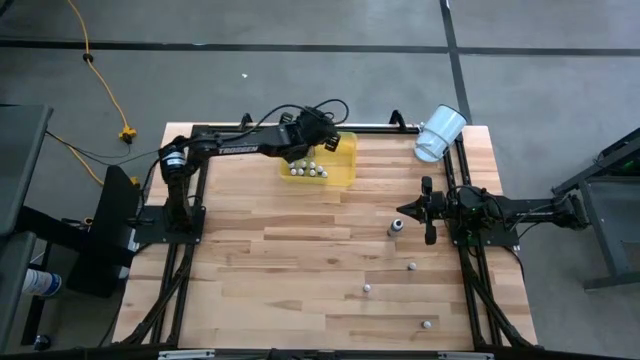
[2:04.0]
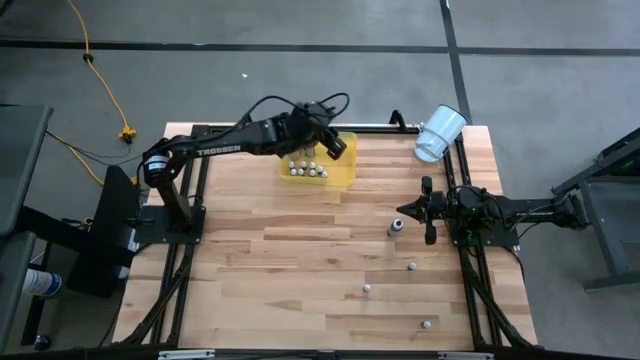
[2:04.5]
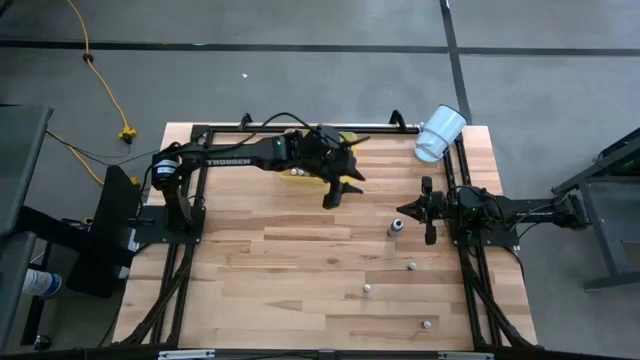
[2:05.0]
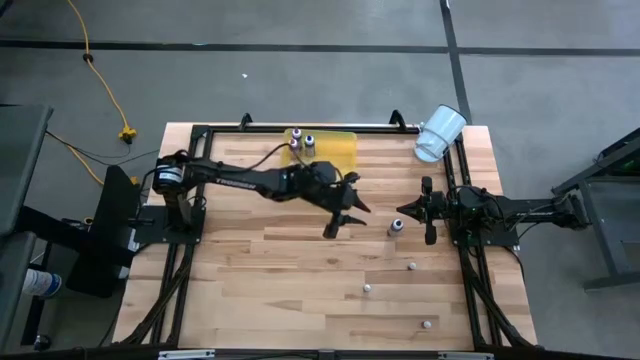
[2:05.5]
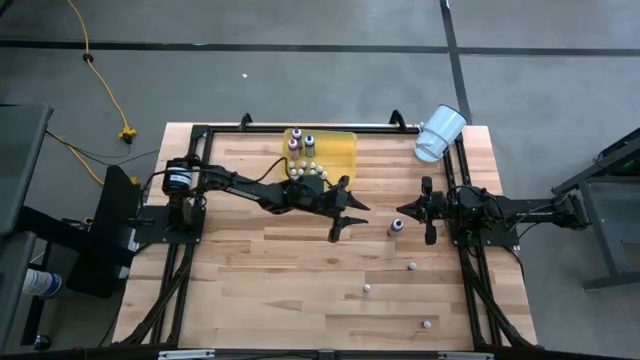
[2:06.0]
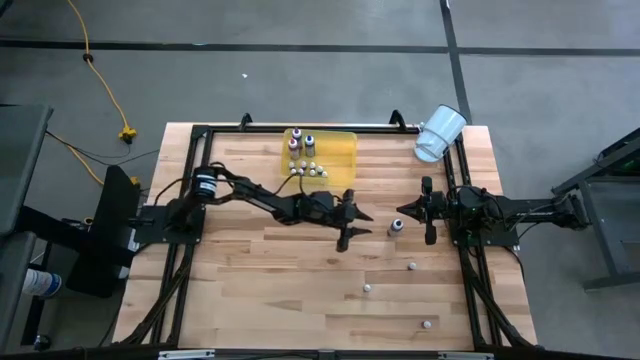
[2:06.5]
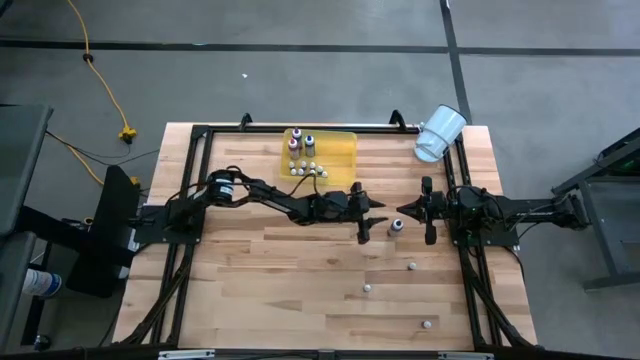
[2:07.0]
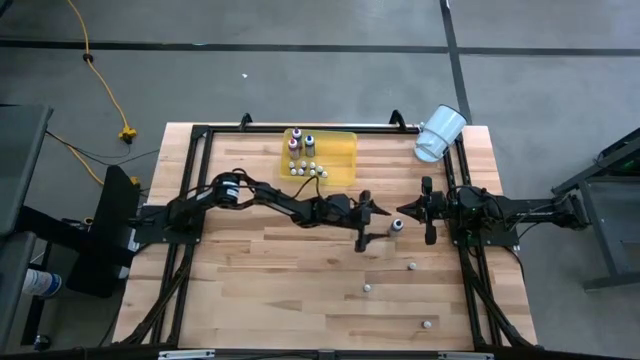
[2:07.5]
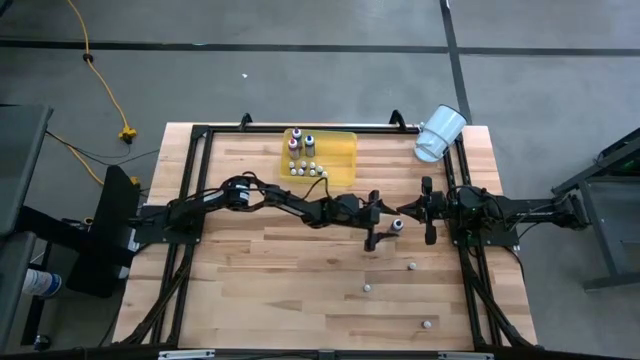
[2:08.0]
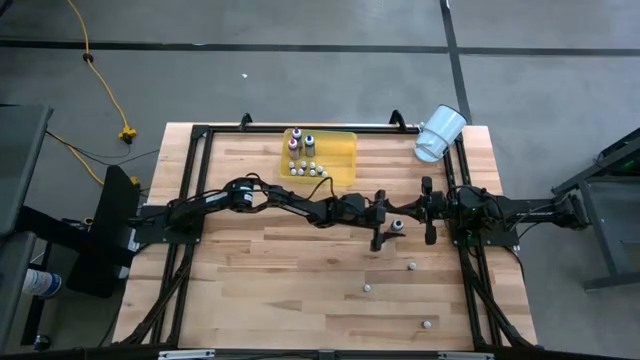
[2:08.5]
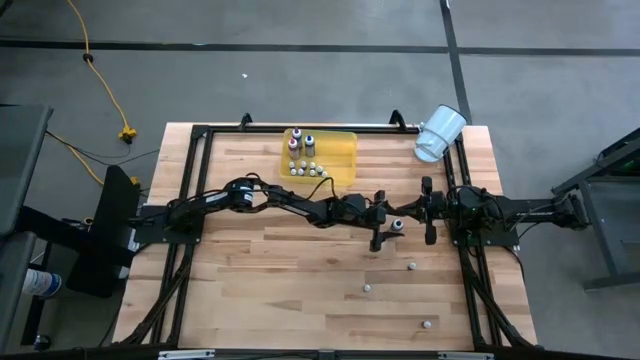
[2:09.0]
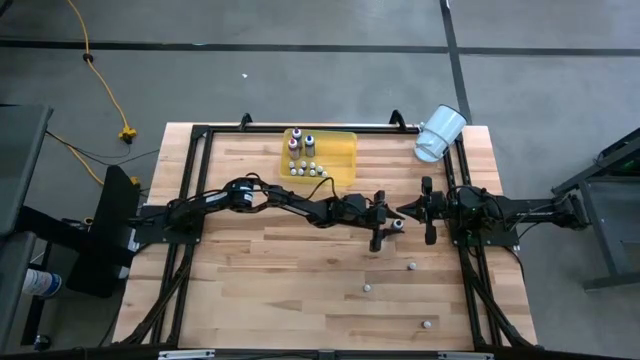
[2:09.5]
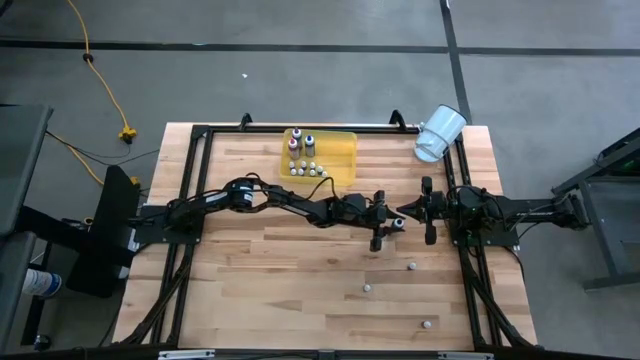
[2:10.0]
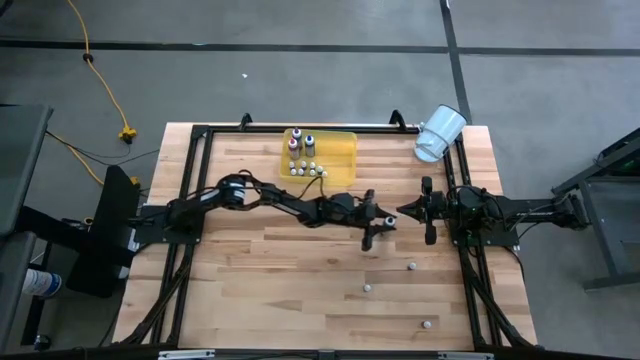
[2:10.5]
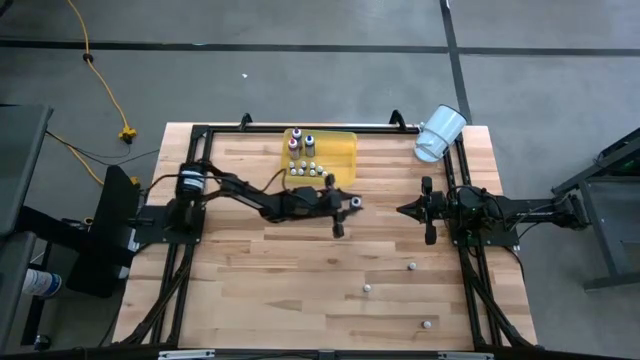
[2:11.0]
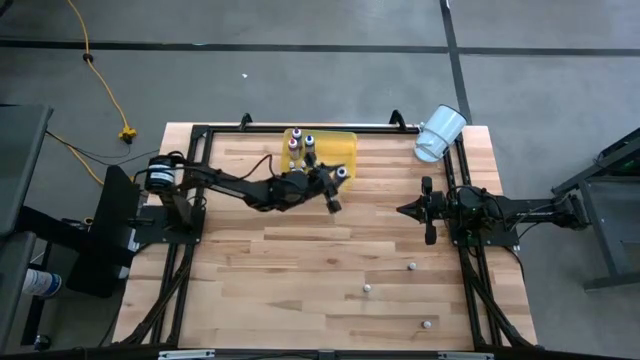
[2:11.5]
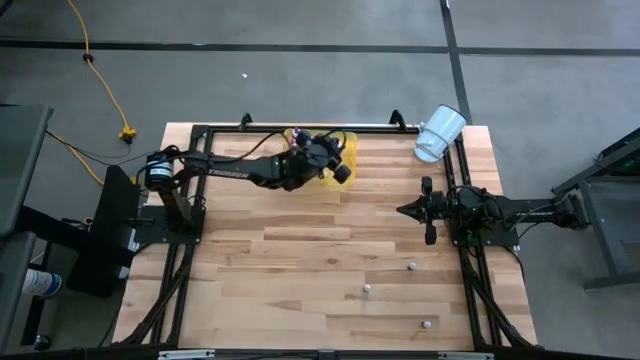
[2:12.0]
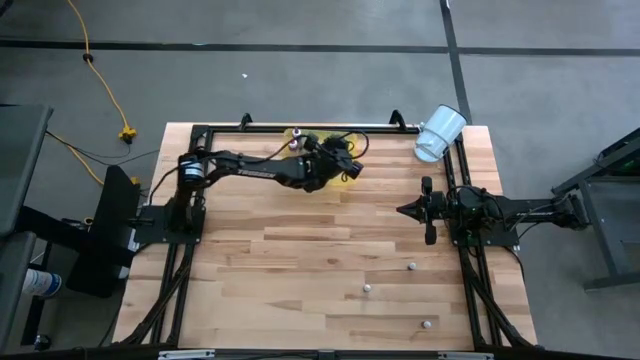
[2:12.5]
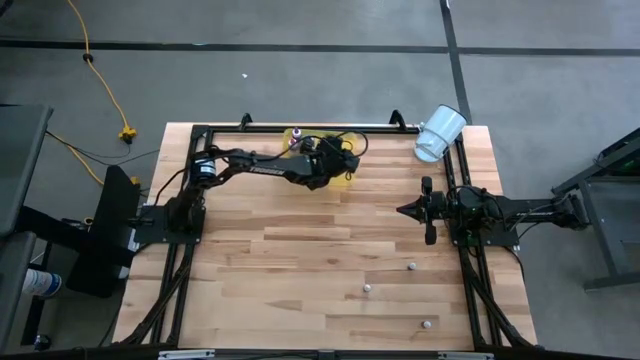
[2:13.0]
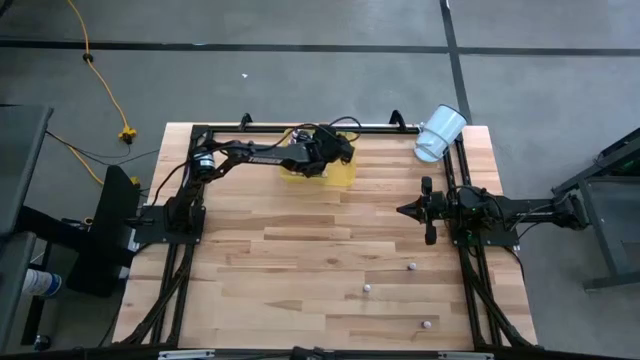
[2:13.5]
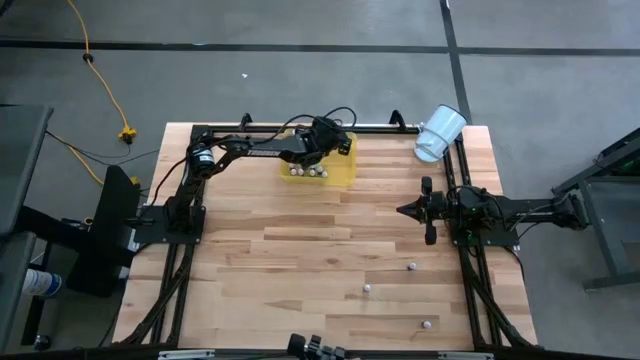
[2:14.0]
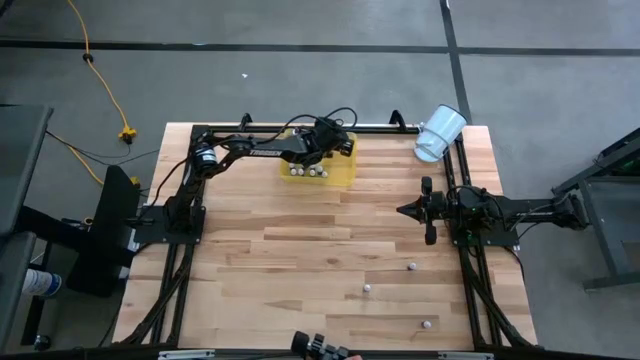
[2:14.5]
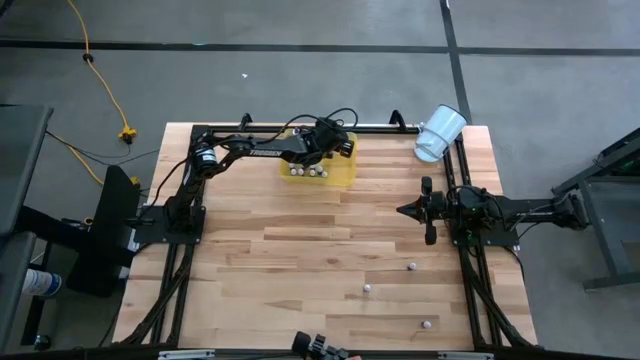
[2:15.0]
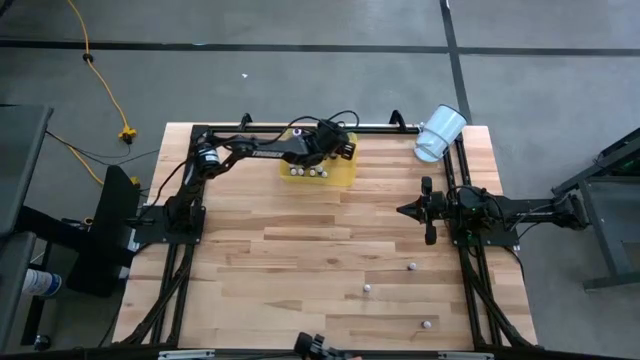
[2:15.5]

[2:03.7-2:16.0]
Task: Pick & Place food coloring
Put the large black food coloring into the yellow container

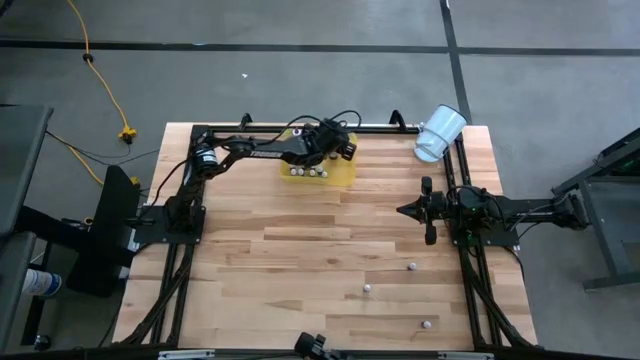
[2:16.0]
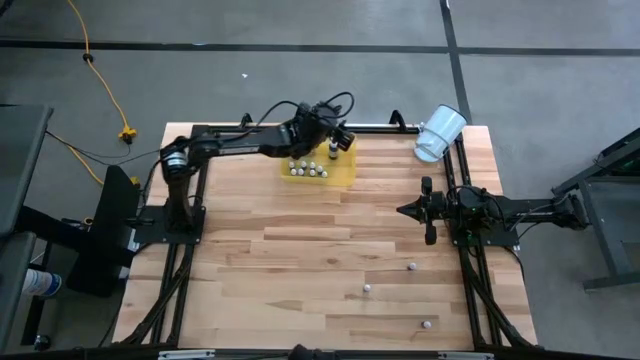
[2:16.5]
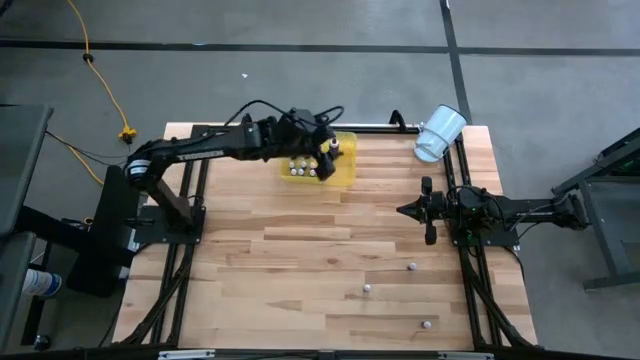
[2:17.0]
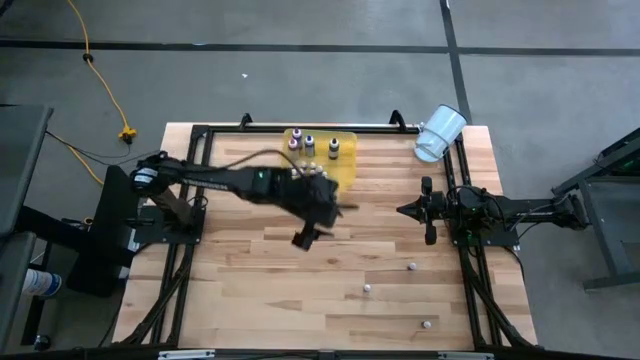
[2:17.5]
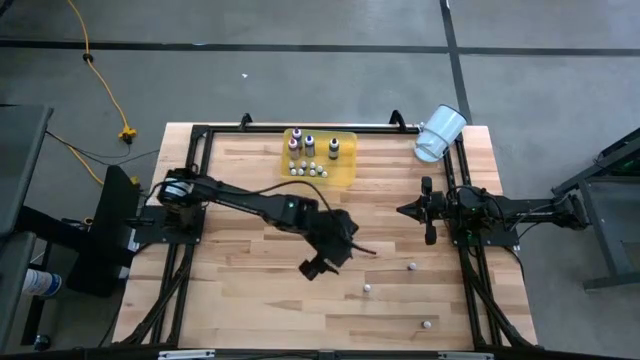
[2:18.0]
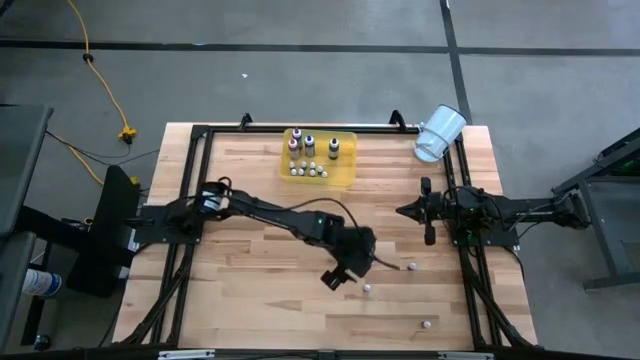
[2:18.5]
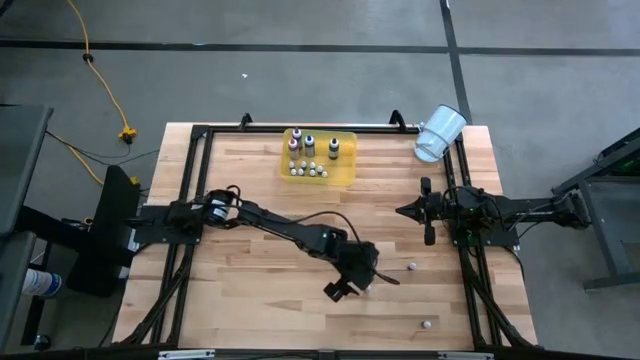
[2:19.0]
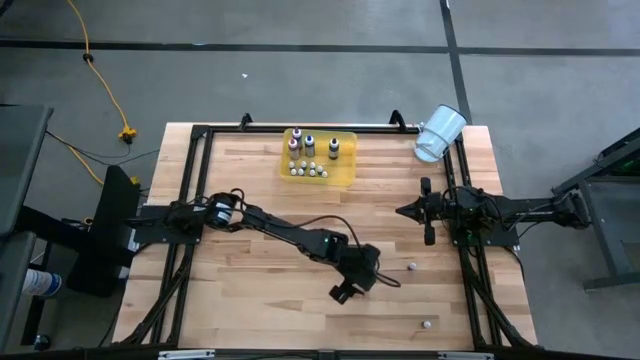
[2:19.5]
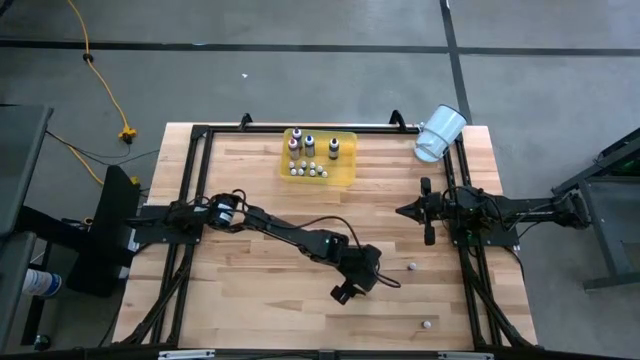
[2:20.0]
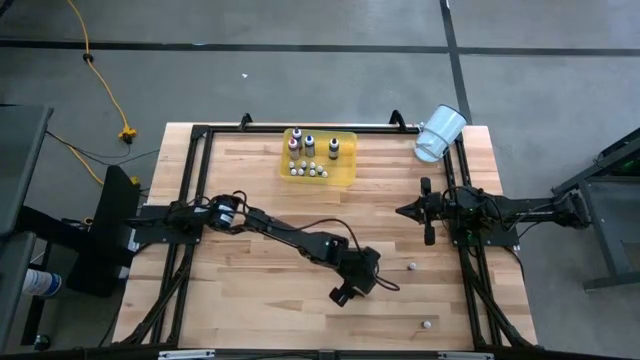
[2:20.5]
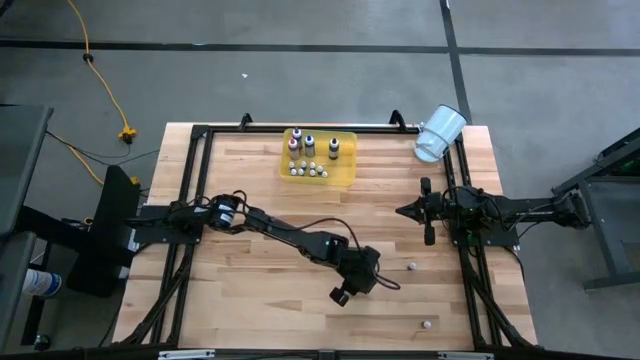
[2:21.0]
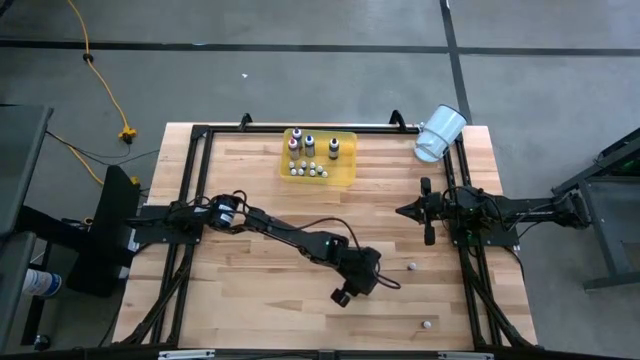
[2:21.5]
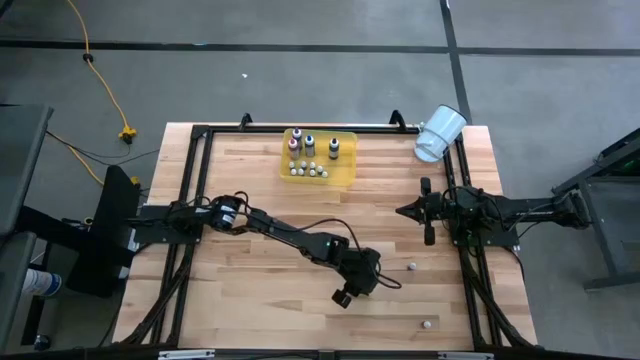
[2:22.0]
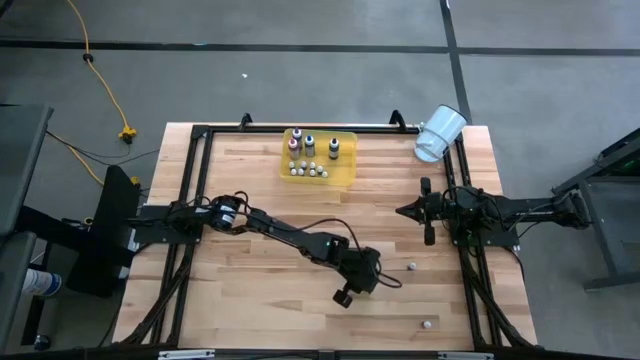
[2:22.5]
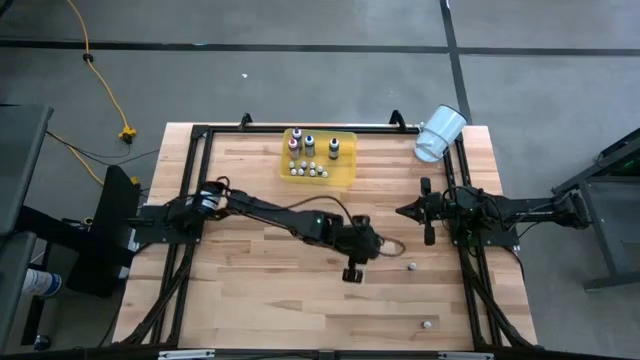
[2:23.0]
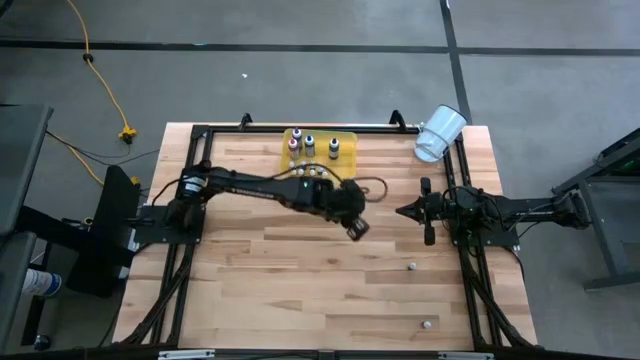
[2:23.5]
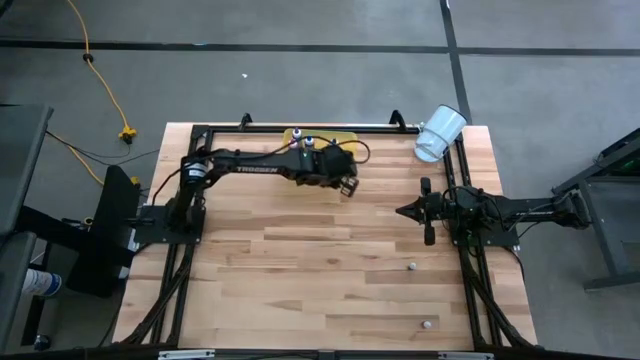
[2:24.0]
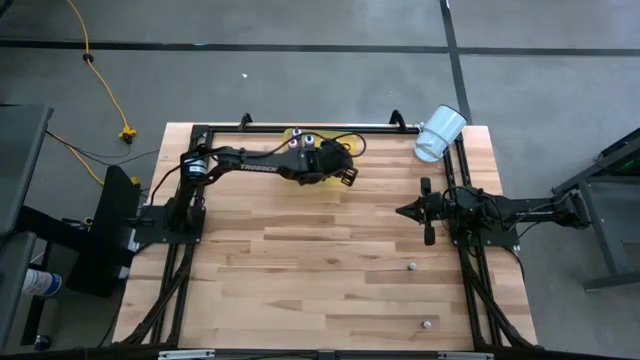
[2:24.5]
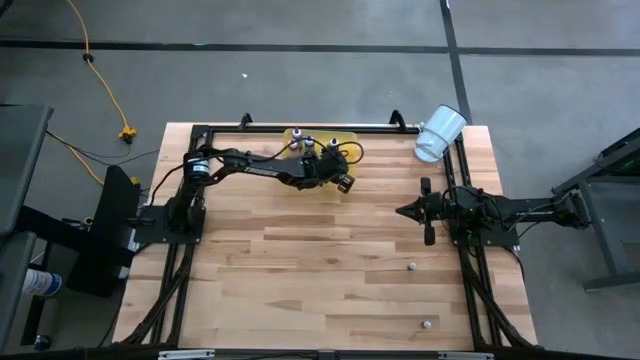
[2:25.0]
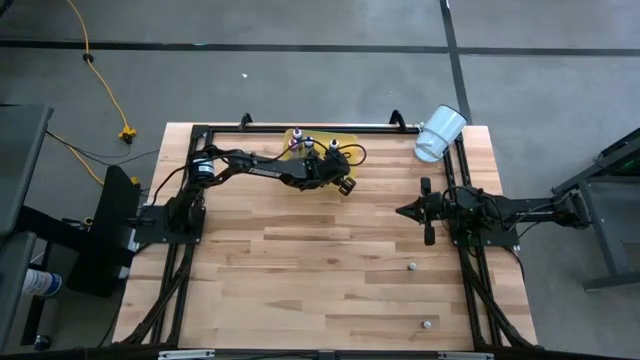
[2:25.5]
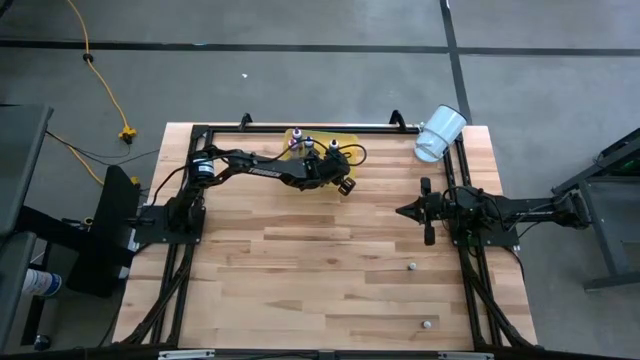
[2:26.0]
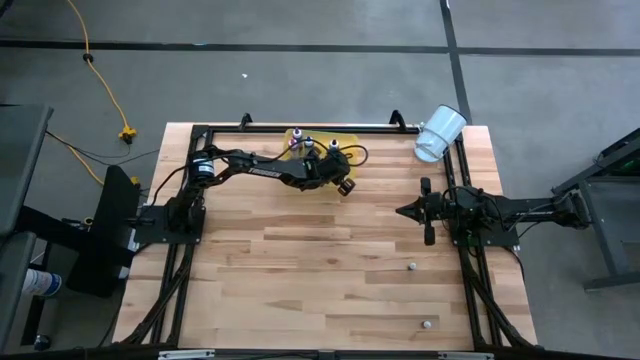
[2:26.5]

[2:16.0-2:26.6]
Put the bottom small green food coloring into the yellow container
